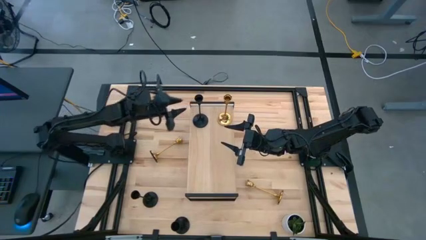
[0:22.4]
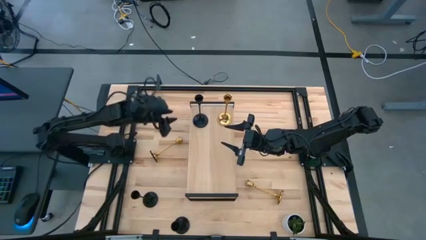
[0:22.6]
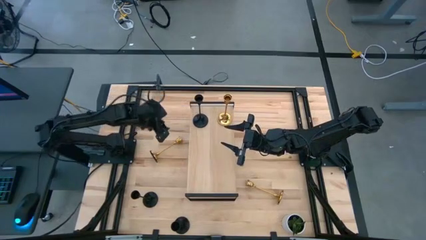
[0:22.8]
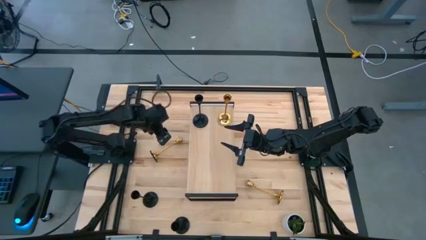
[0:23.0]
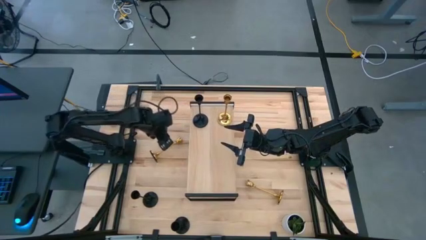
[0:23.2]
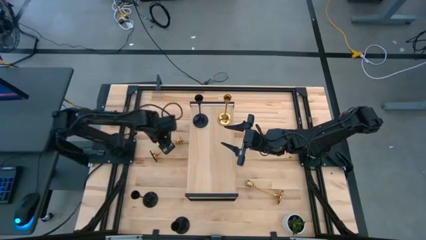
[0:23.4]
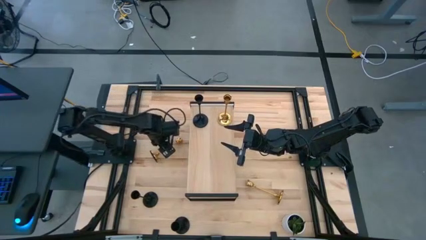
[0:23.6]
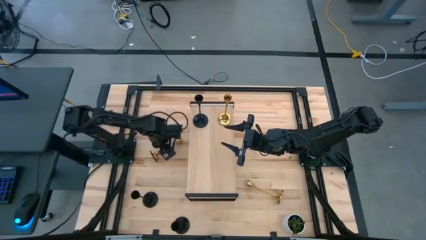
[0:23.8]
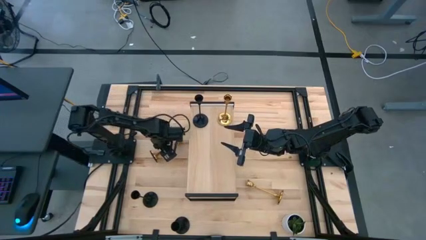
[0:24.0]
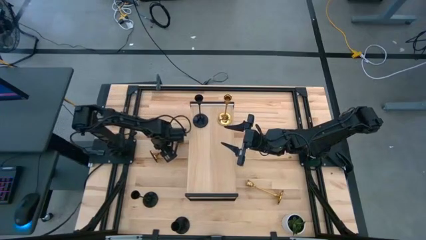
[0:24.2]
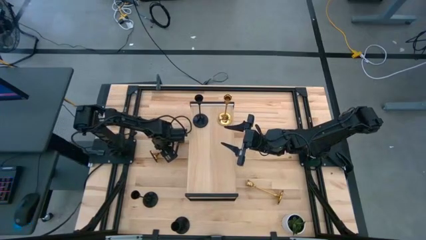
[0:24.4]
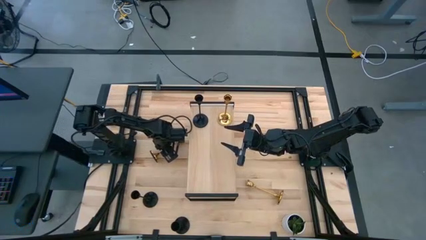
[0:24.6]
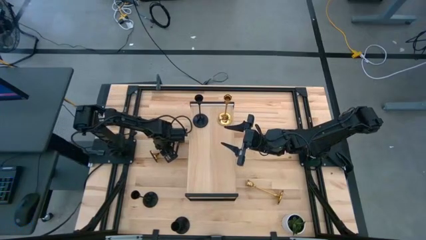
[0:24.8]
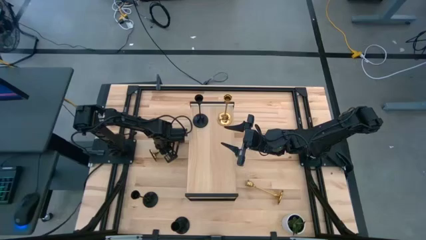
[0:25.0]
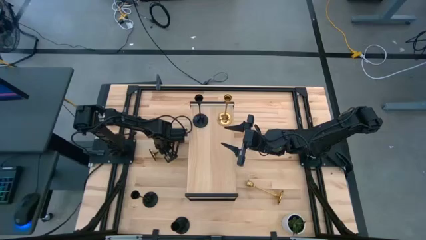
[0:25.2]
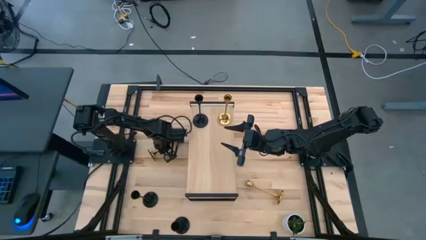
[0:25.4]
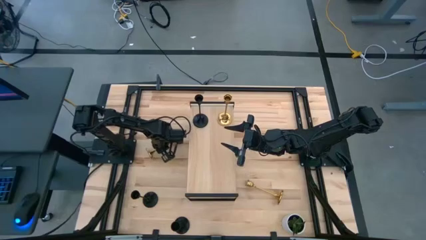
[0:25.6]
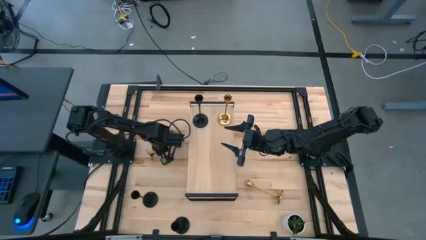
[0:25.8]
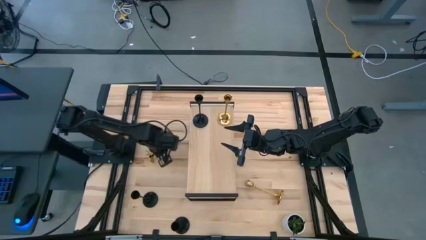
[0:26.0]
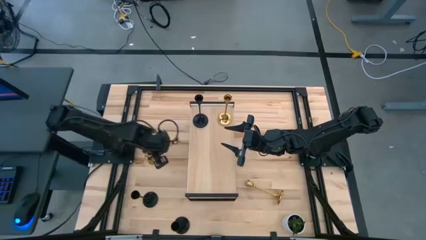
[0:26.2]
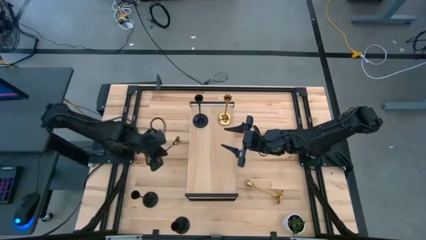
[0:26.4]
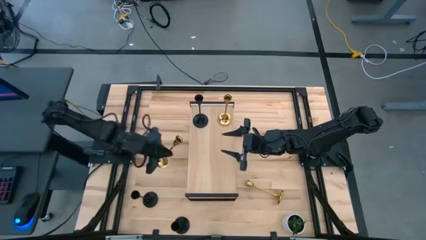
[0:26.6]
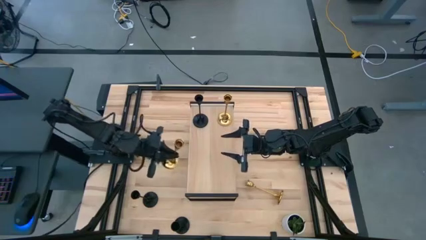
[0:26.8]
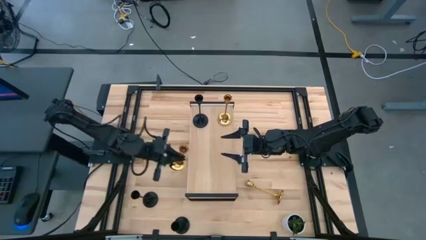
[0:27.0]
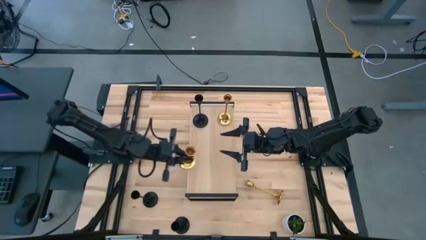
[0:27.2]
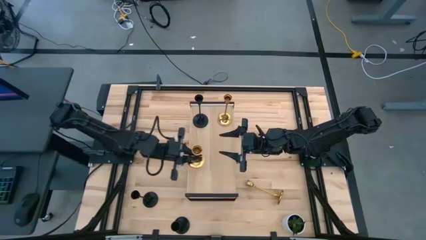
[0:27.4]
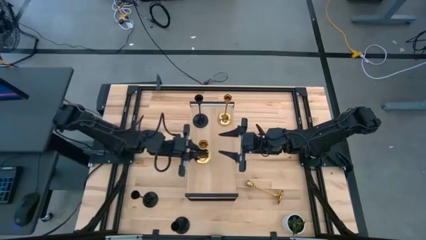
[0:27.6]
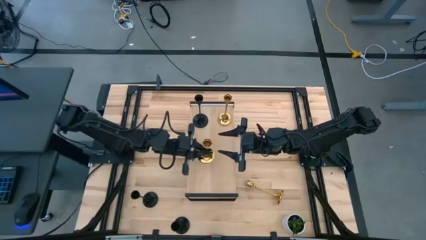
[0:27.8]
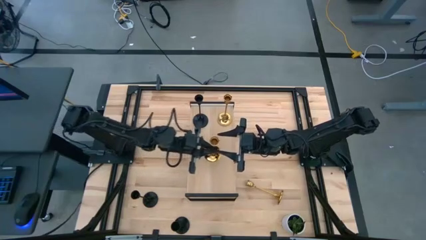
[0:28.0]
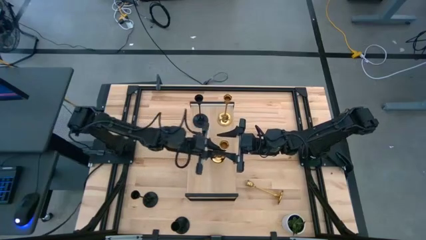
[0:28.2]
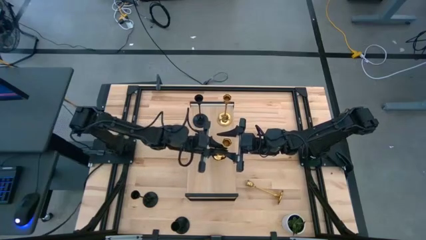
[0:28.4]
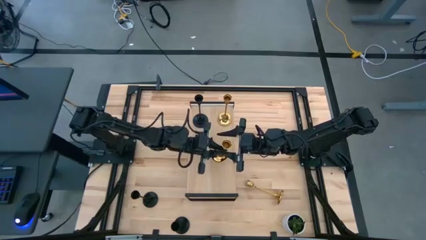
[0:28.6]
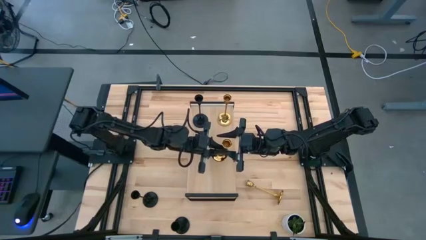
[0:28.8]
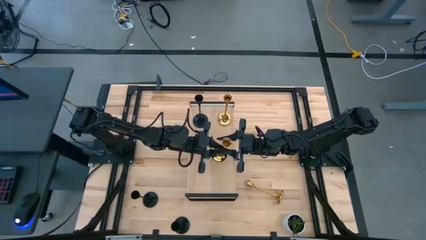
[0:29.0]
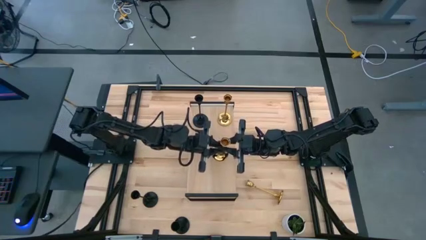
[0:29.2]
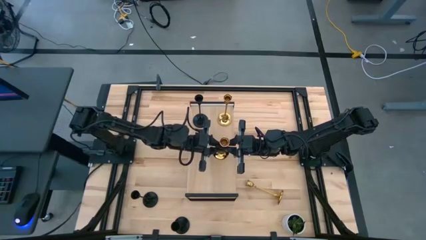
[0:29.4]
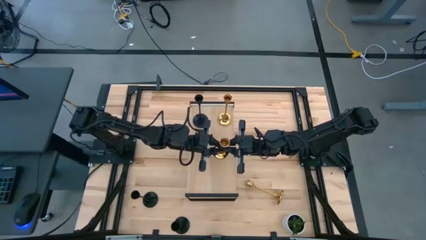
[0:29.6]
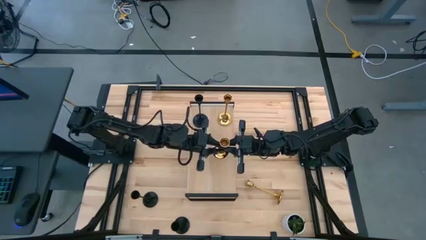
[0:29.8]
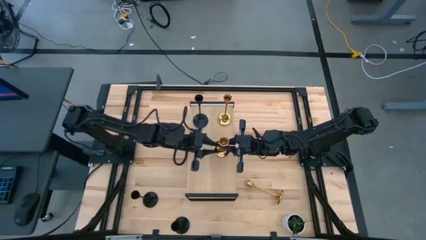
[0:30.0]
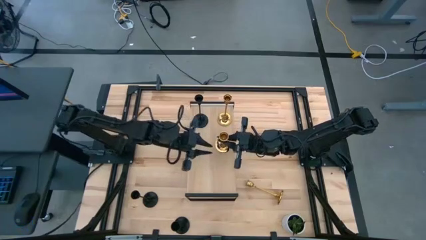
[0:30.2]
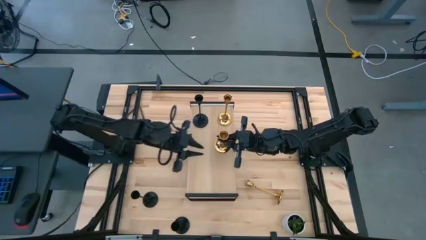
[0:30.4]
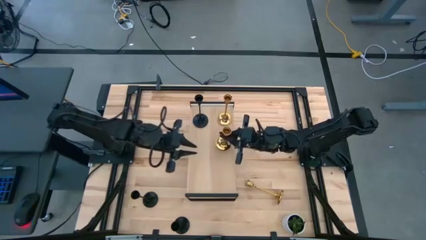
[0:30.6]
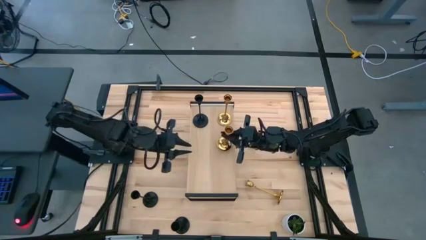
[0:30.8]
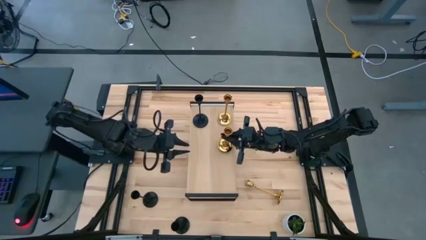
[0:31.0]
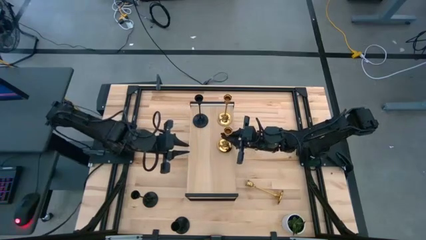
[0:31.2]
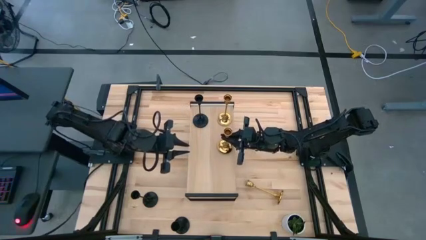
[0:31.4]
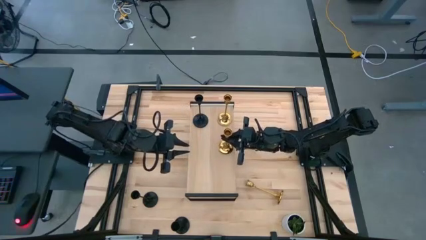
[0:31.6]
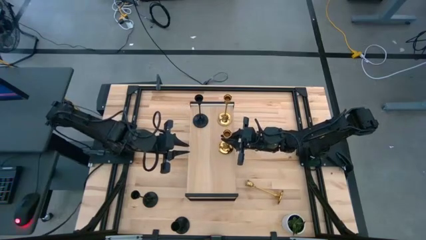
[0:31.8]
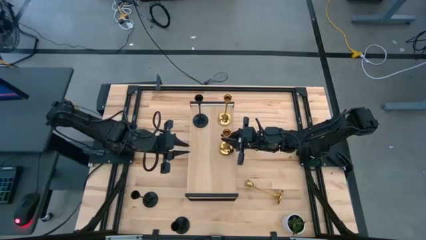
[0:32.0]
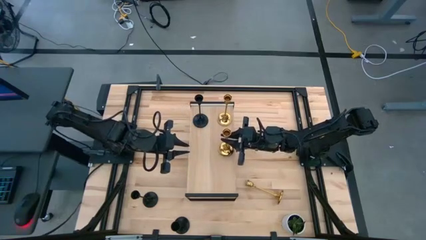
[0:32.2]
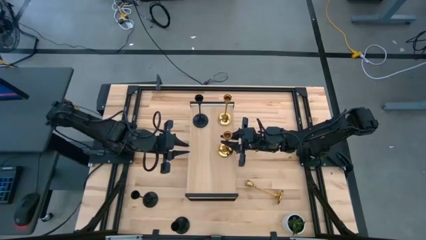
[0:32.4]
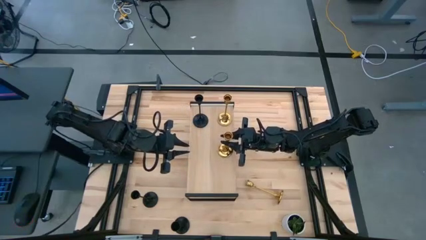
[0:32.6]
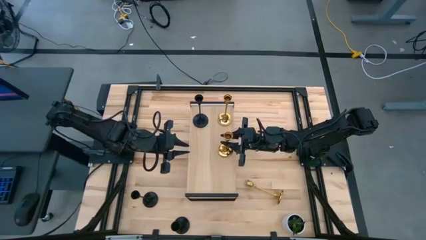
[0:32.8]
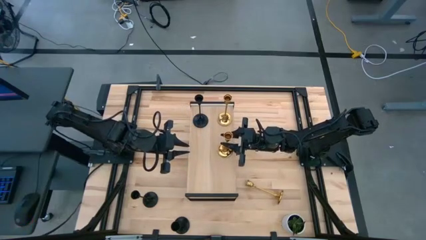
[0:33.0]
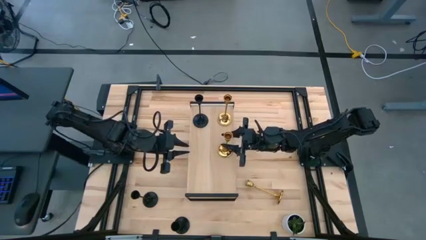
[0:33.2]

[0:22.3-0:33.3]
Task: Pick & Place candle stick holders
Put the left gold candle holder on the shelf aligned with the other gold candle holder
